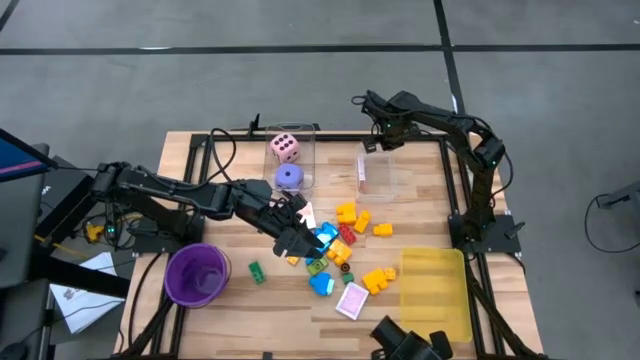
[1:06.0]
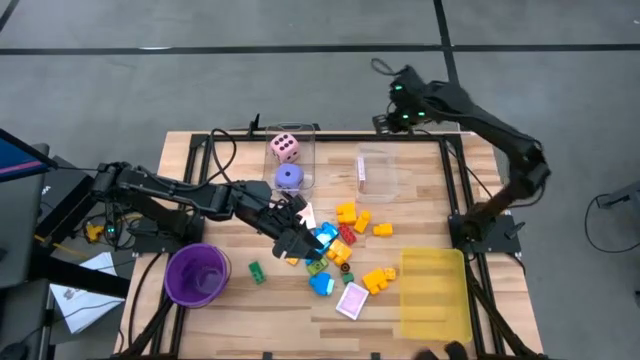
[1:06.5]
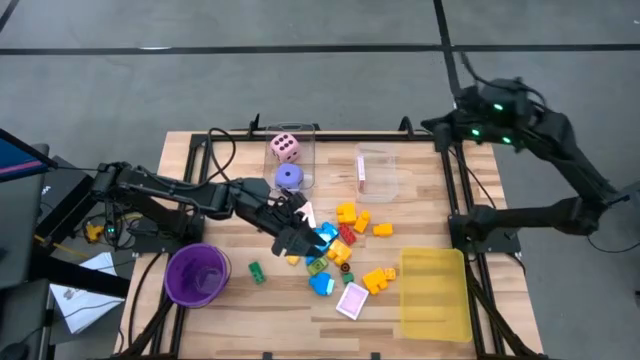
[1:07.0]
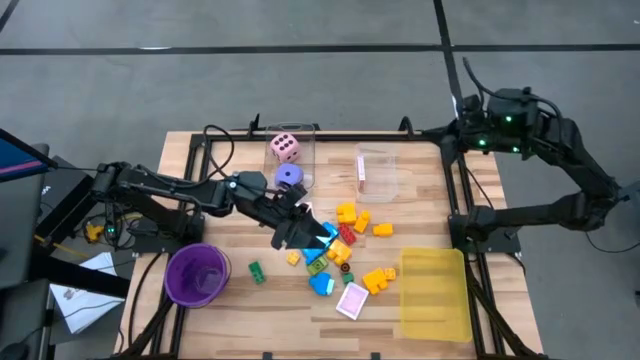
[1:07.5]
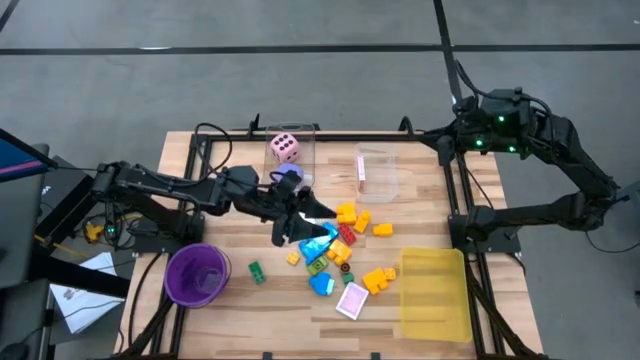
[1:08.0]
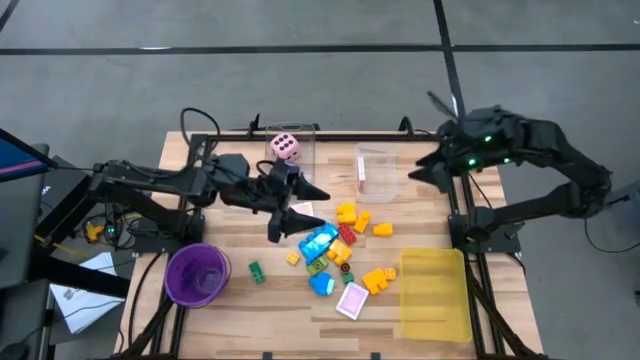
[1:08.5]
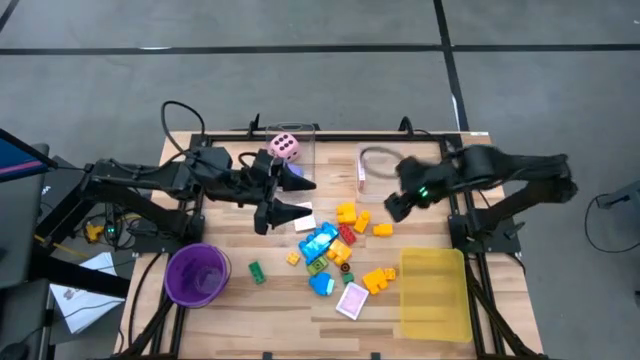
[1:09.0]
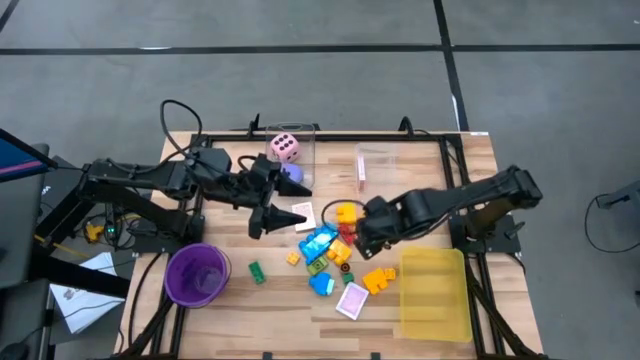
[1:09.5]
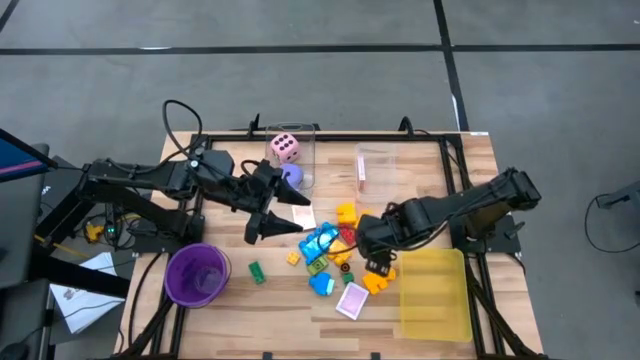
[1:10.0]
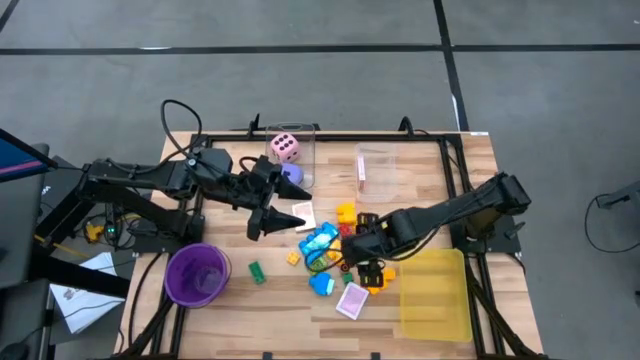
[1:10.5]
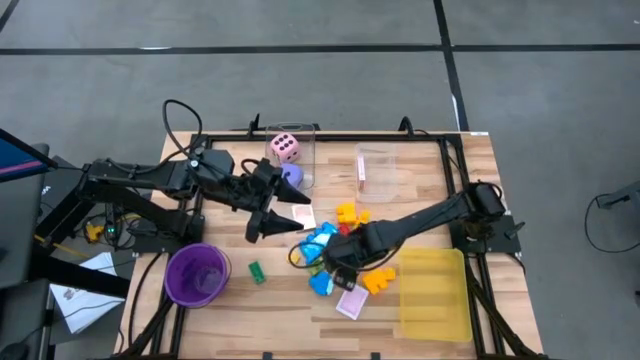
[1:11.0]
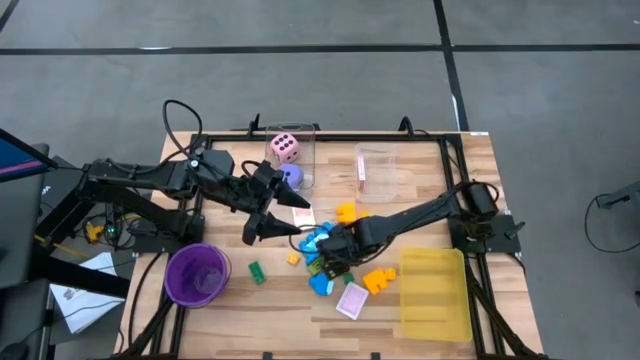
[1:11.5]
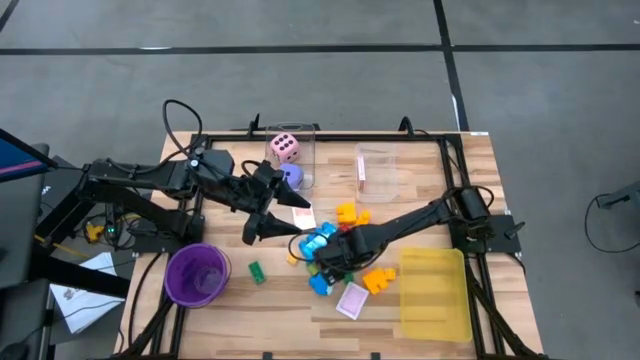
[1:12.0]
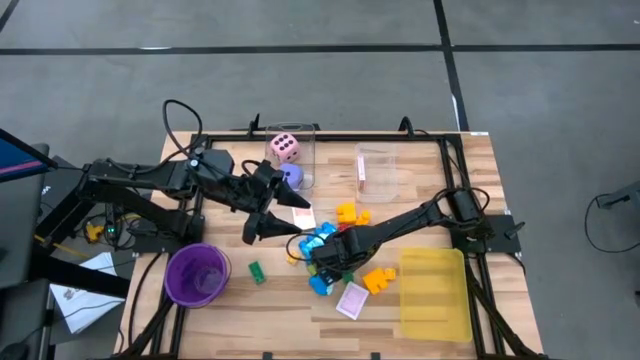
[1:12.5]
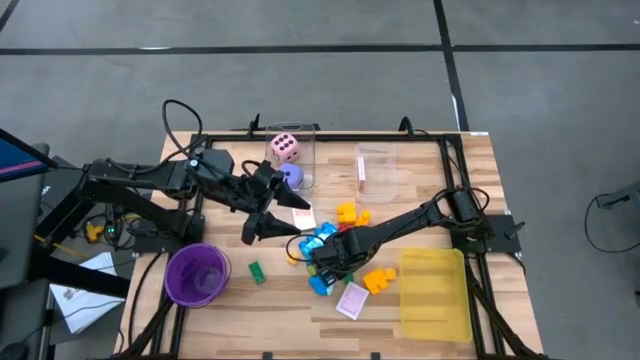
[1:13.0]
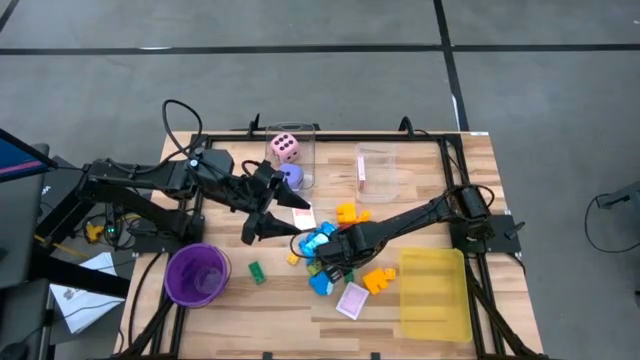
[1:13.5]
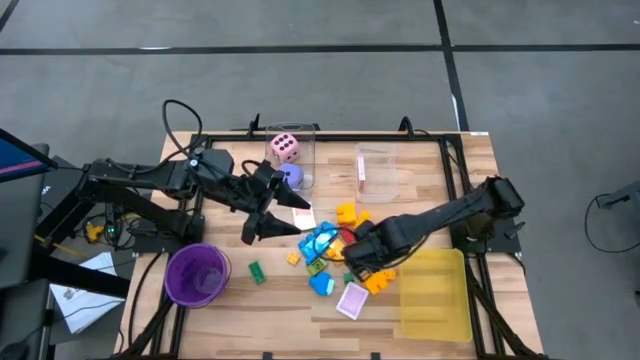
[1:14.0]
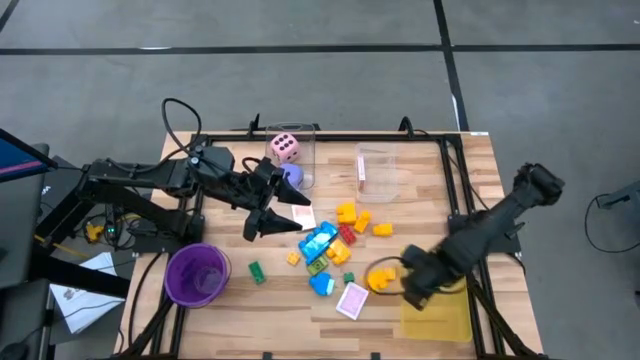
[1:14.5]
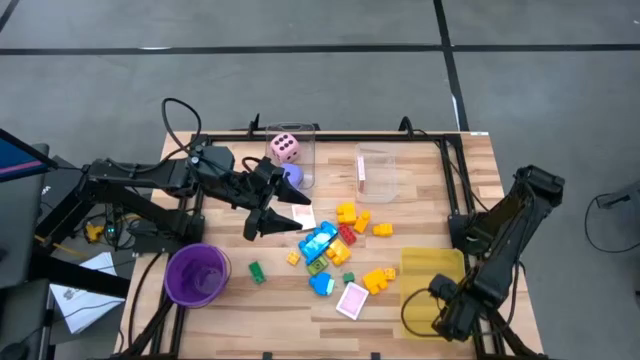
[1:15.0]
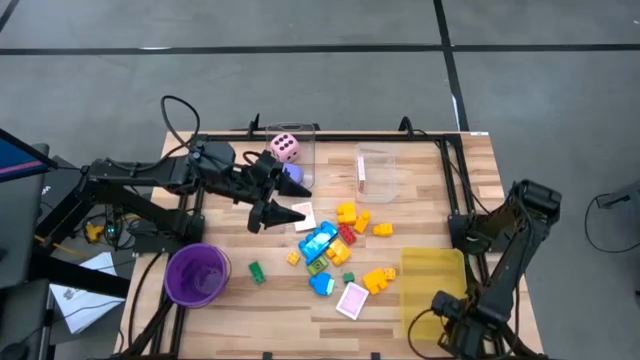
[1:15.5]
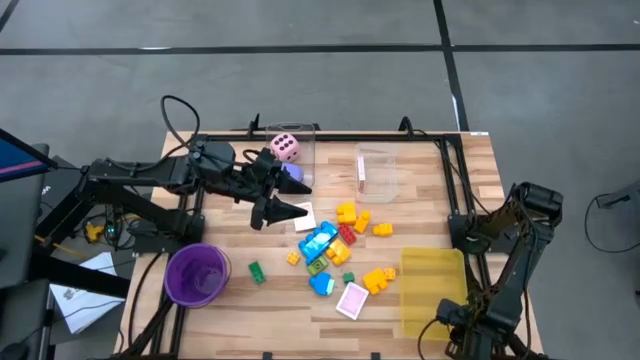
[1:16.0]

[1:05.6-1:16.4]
Task: Pick & Place Toys
Put the brown game piece into the yellow bin

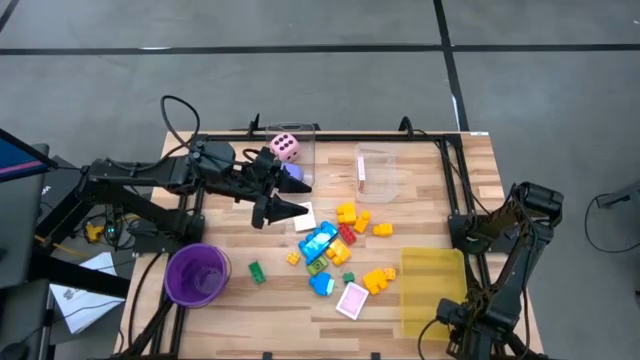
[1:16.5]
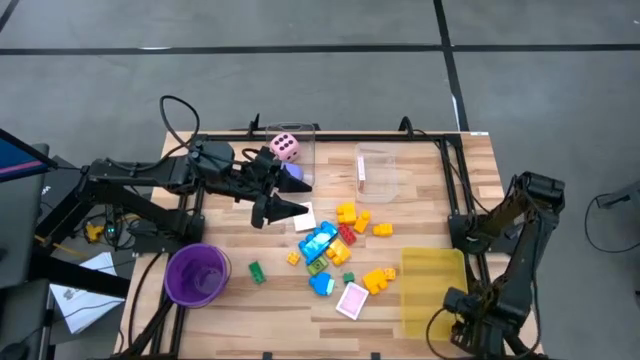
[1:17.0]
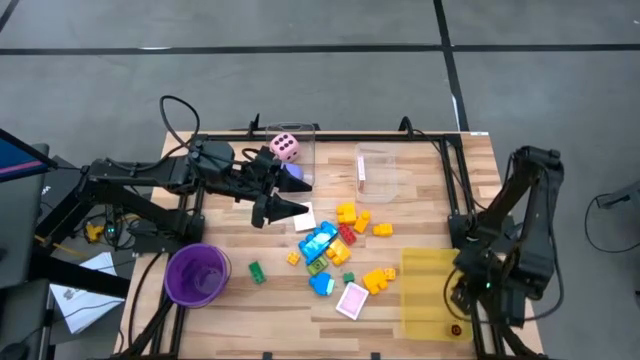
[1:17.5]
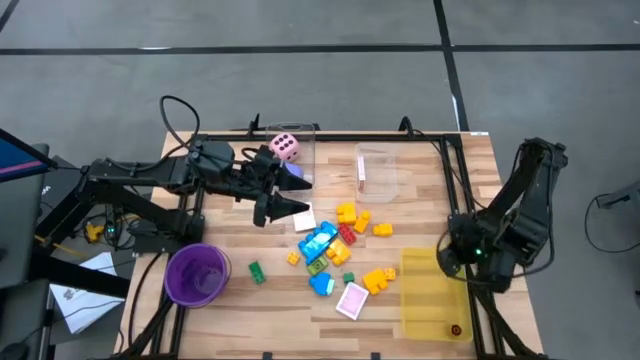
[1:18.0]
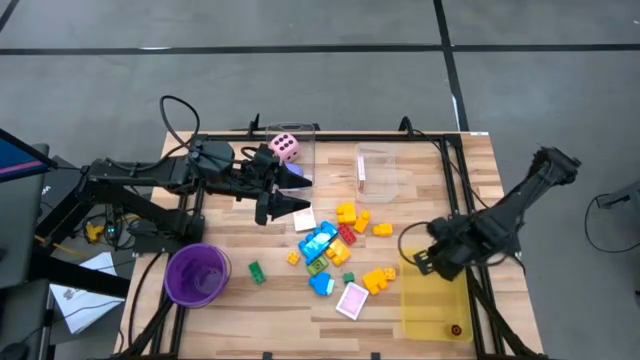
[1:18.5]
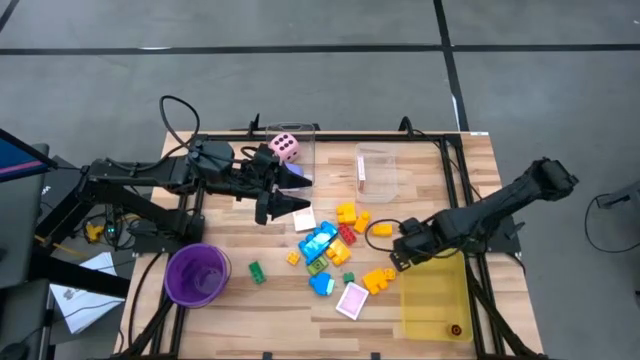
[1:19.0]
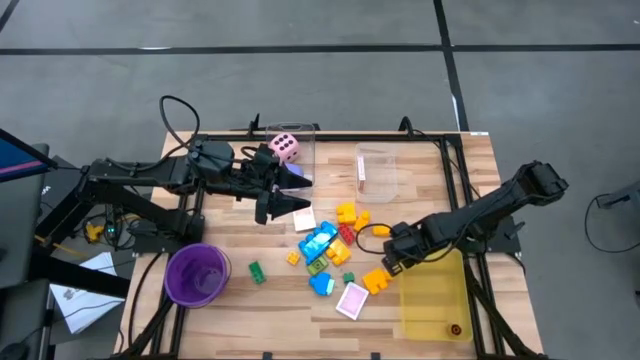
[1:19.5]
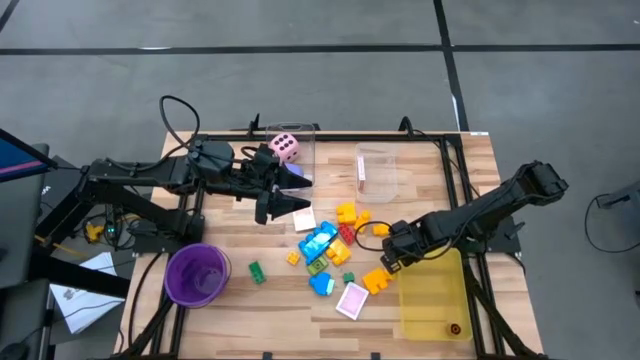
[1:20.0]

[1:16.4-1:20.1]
Adjust the yellow bin

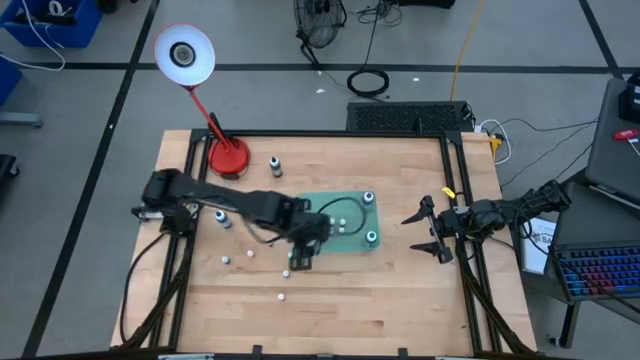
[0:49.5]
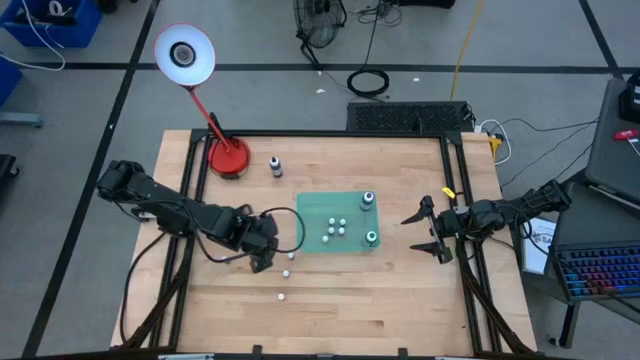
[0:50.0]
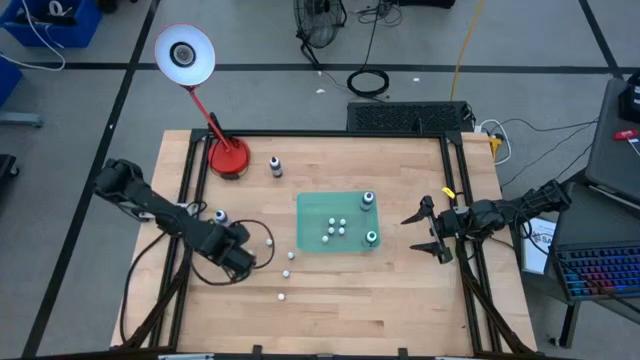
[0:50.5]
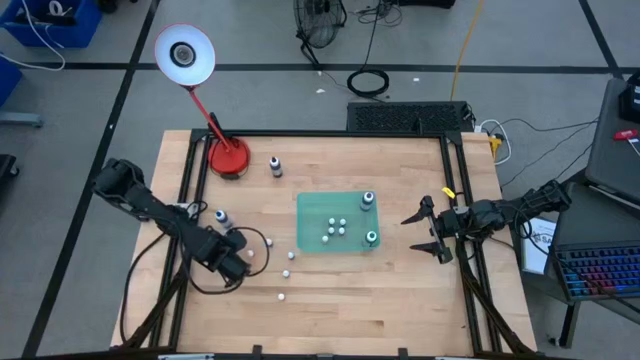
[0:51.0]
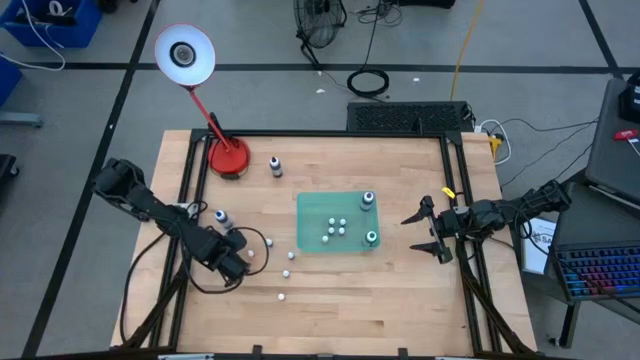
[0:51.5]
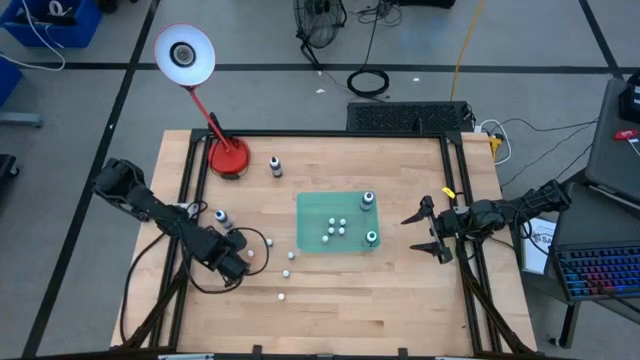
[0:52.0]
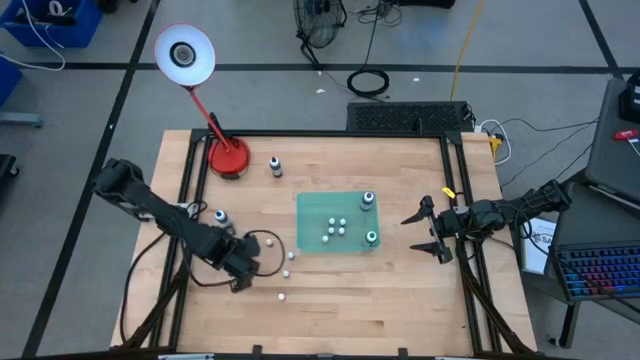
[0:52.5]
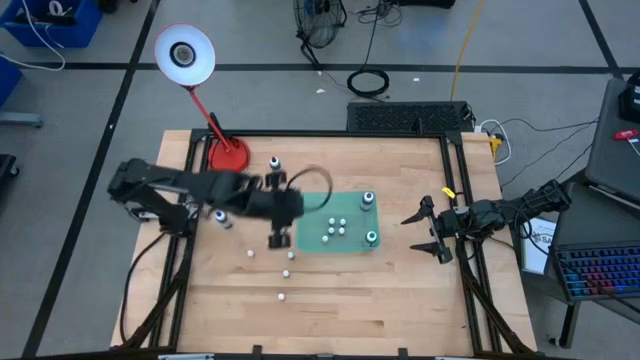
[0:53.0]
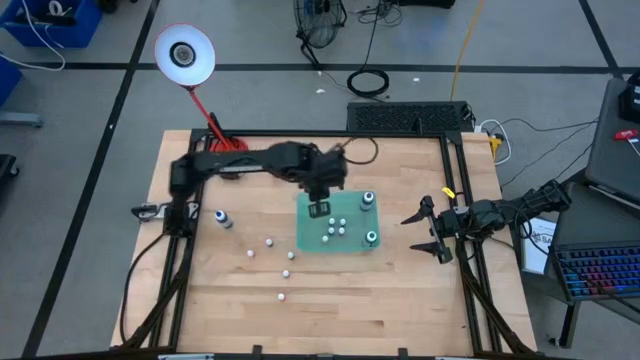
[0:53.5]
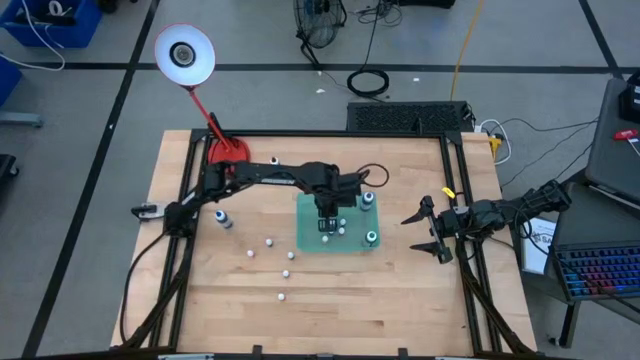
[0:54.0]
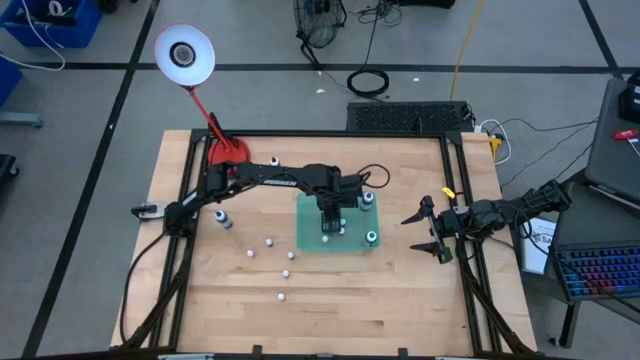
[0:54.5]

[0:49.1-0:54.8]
Task: Pick & Place food coloring
Put the small purple food coloring bottle into the blue bin

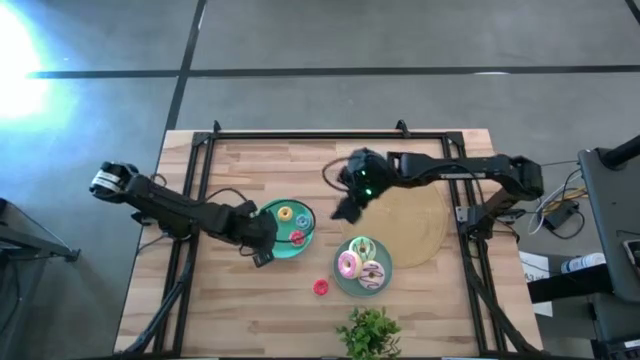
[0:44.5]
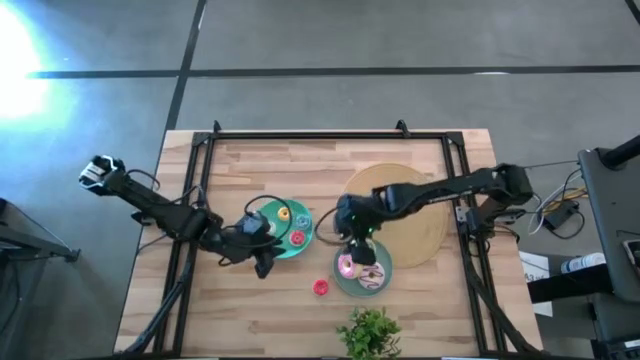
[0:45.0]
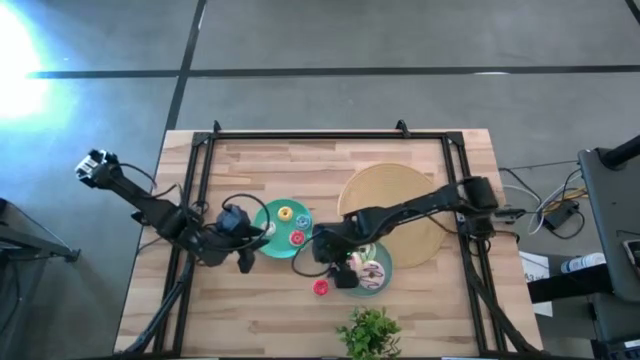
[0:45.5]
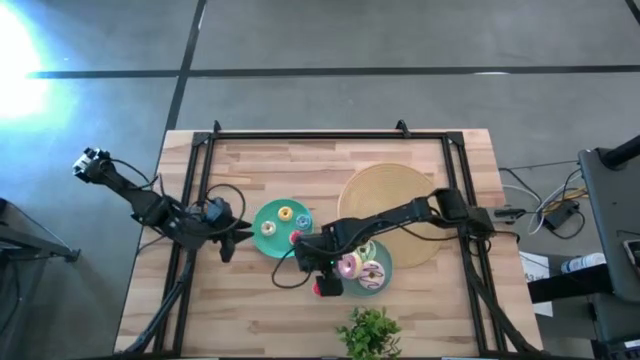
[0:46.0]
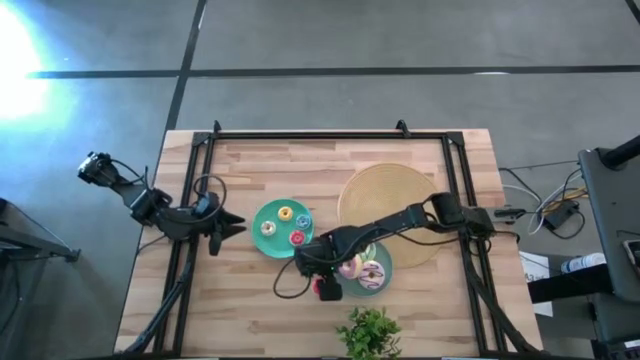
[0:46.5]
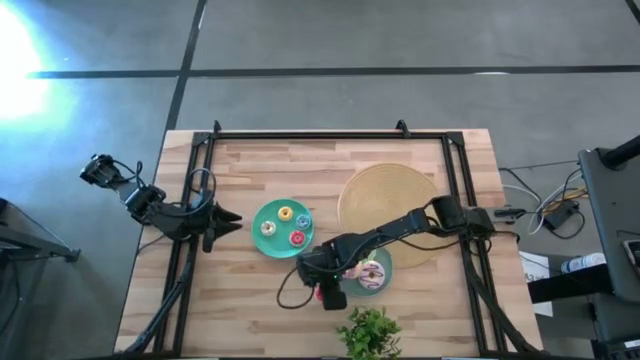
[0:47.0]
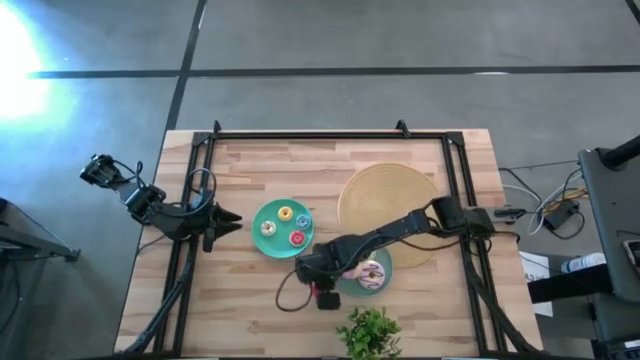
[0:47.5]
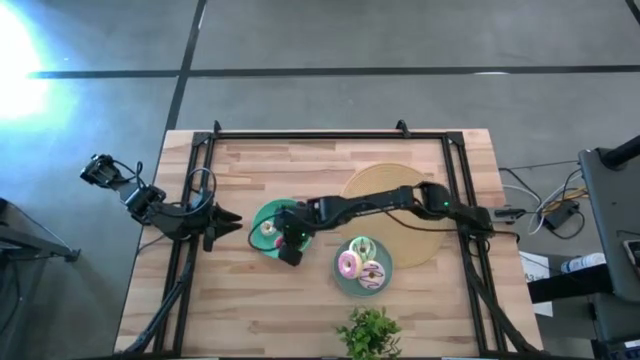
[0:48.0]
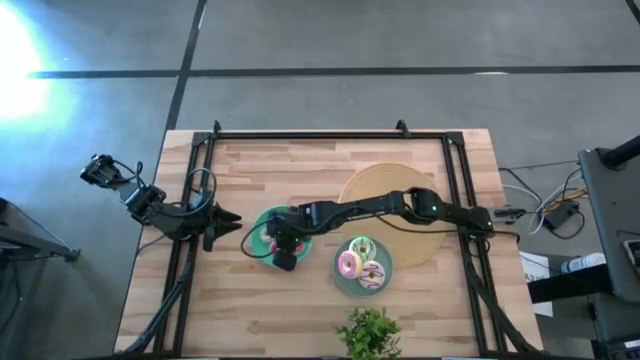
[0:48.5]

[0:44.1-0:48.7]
Task: Pick & Place donuts
Put the small red donut on the green plate
